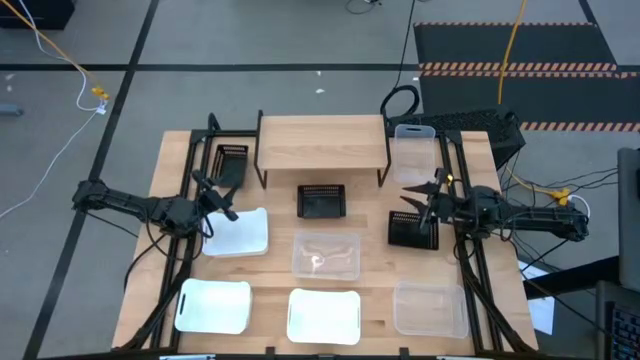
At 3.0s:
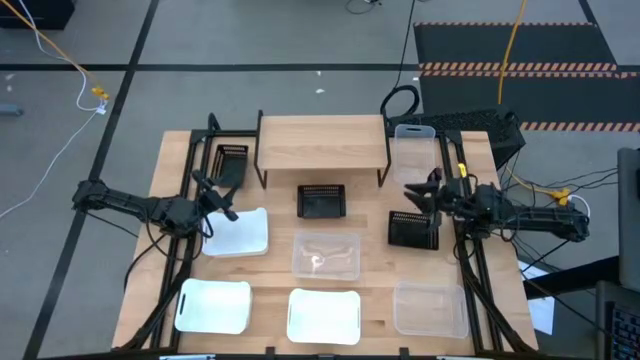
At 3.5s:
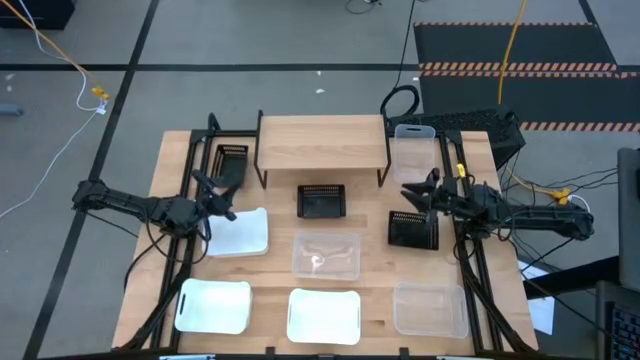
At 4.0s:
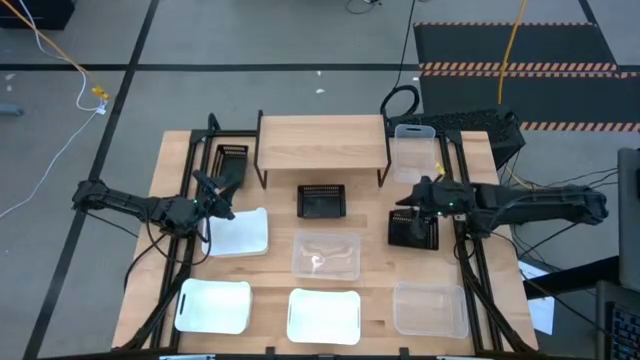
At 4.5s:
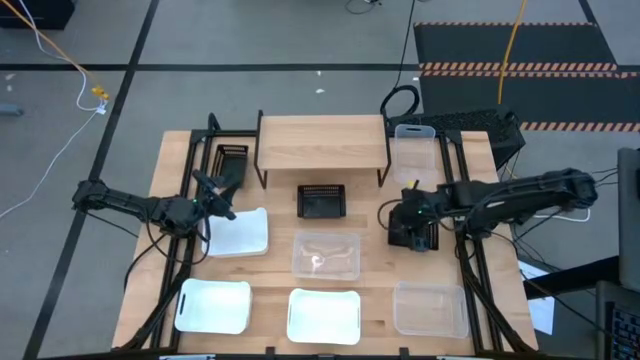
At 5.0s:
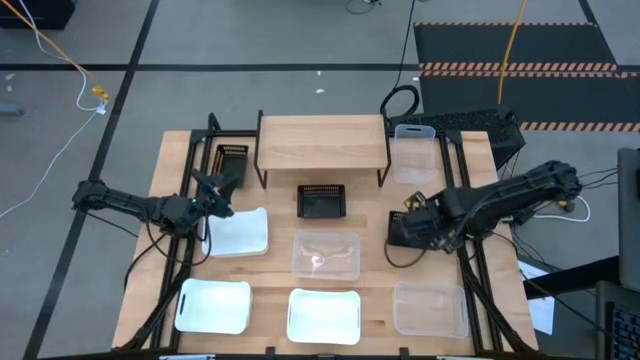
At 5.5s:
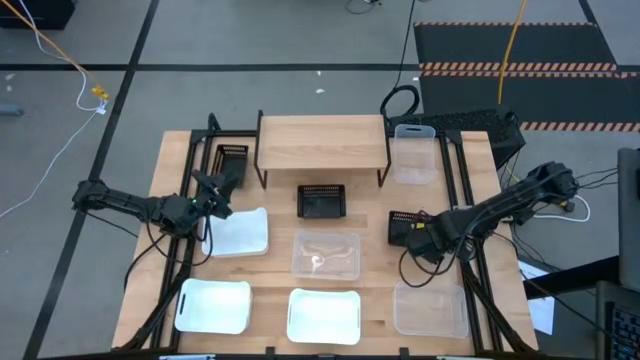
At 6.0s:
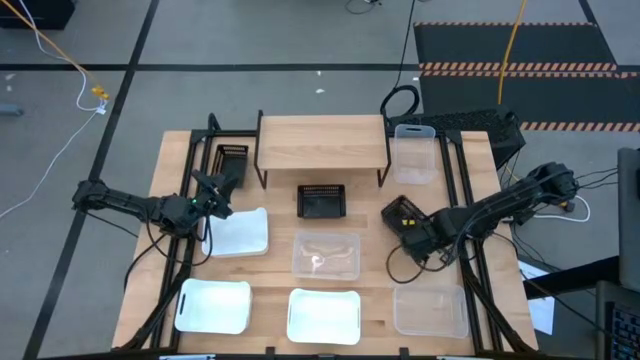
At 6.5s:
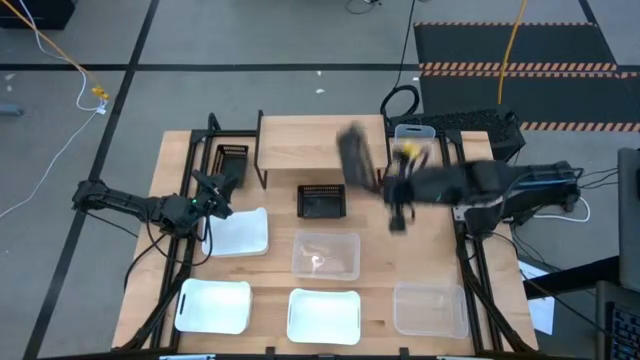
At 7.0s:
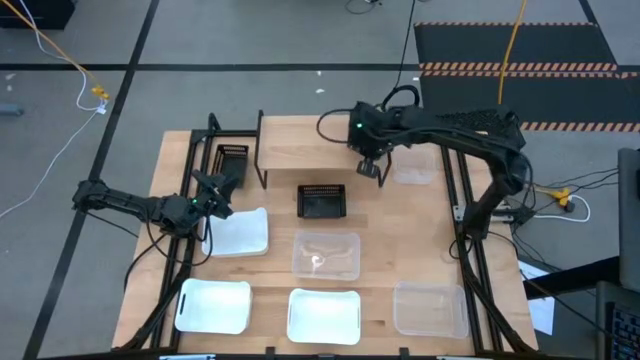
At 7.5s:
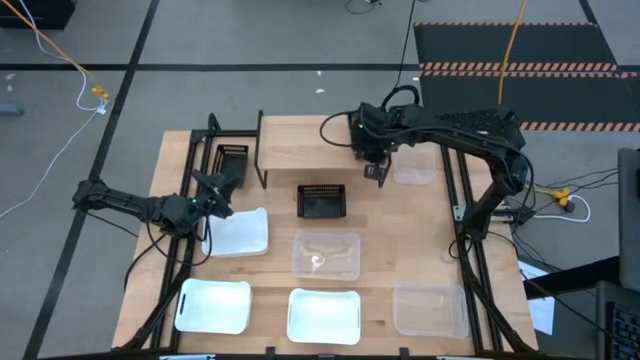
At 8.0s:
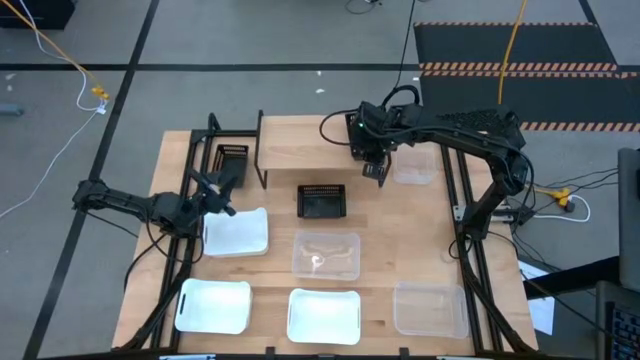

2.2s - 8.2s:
Task: Stack baskets on shelf by color
Put the bottom black bin on the shelf

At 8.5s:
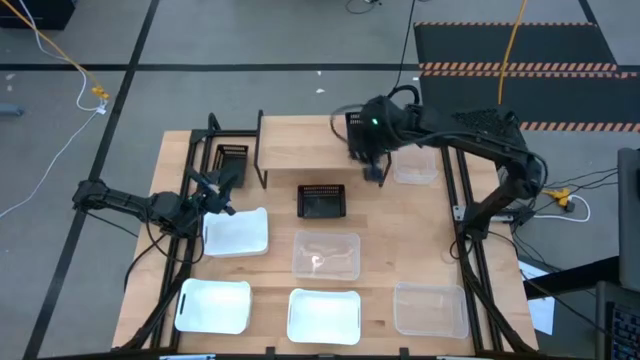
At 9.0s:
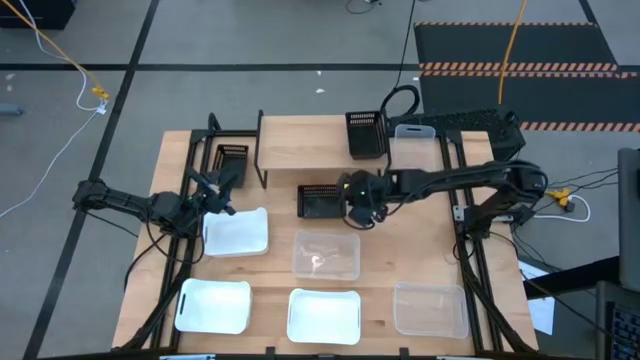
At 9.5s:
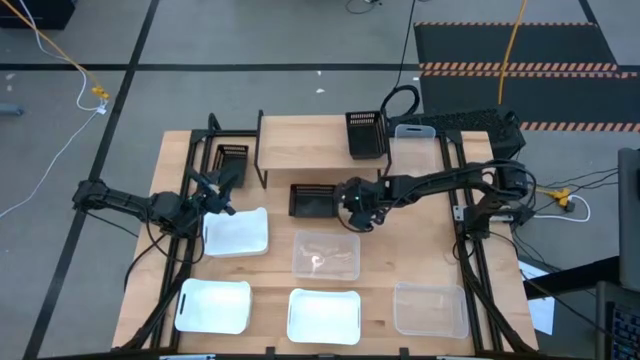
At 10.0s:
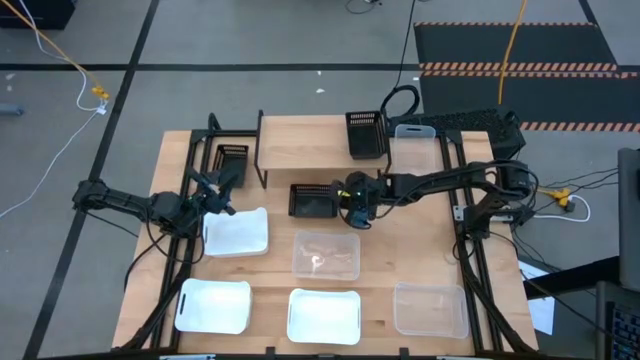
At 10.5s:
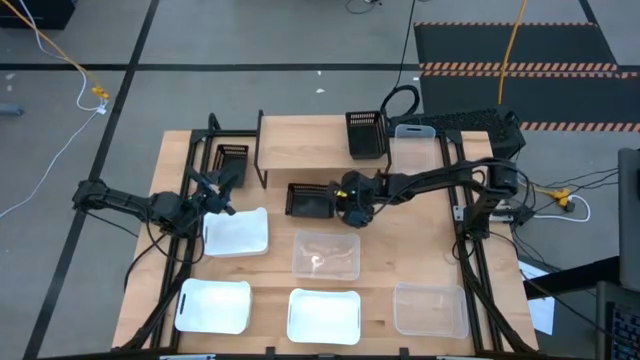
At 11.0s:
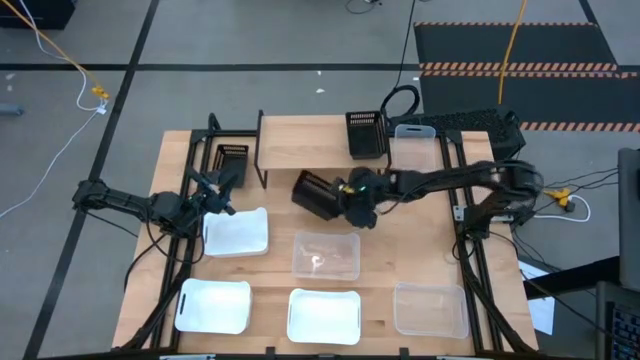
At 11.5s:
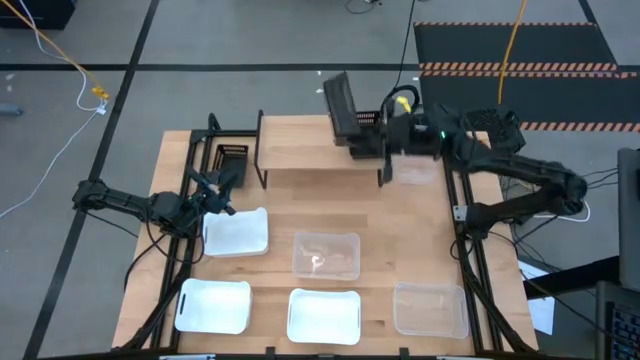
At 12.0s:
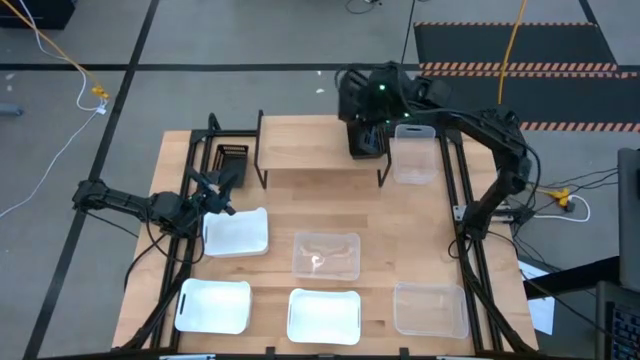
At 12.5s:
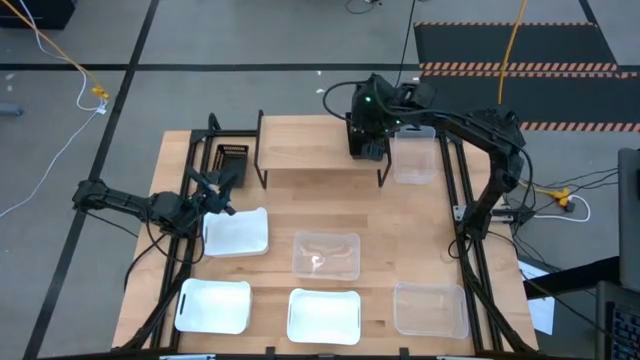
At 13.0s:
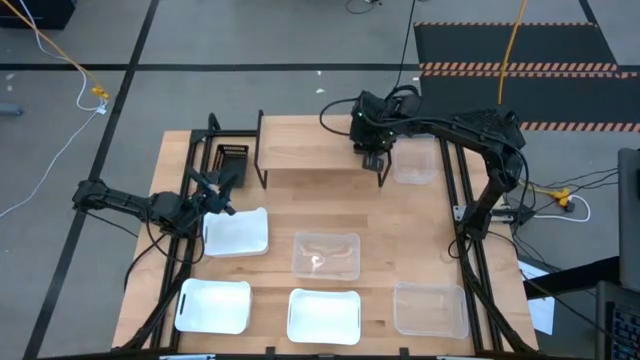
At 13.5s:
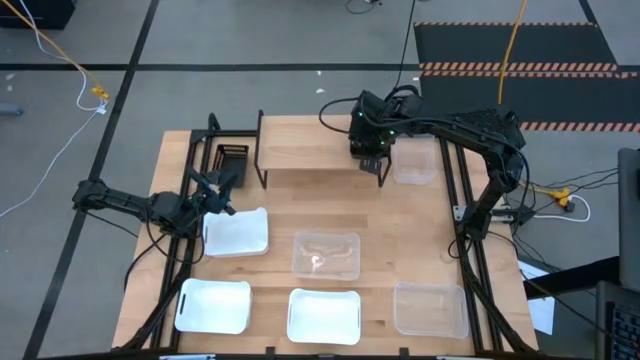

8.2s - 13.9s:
Stack the bottom black bin on the black bin on the shelf

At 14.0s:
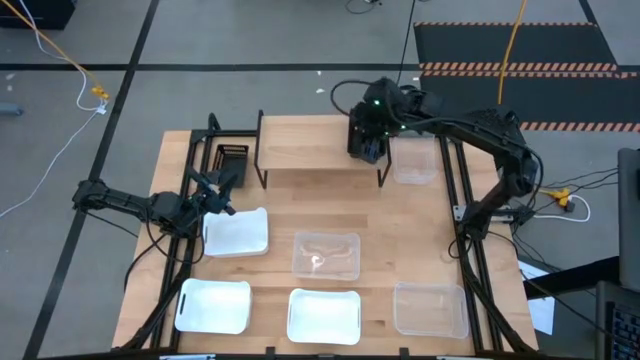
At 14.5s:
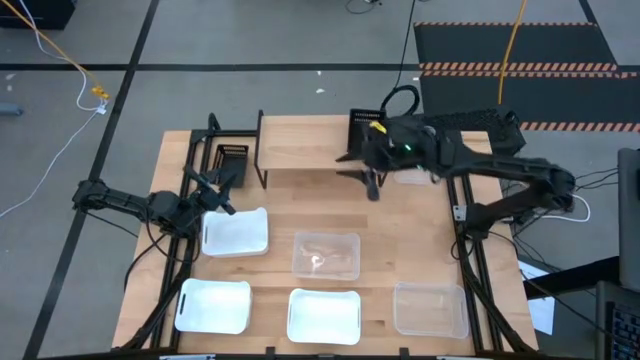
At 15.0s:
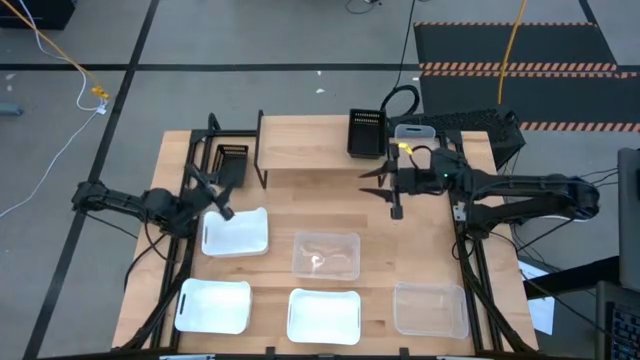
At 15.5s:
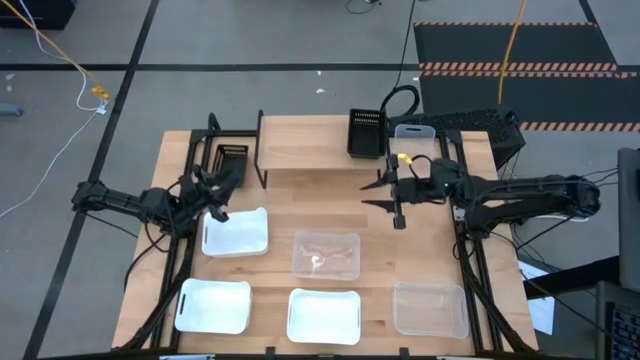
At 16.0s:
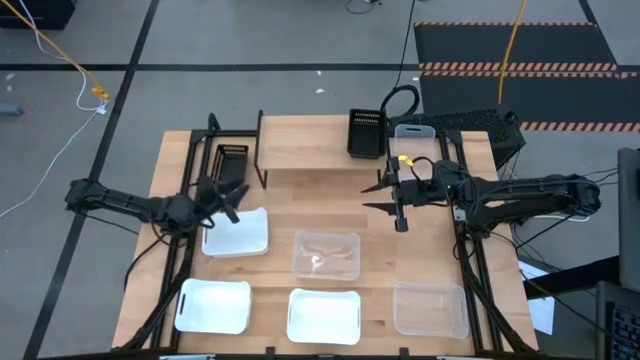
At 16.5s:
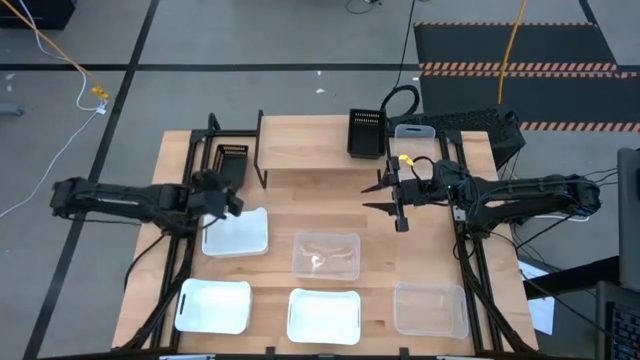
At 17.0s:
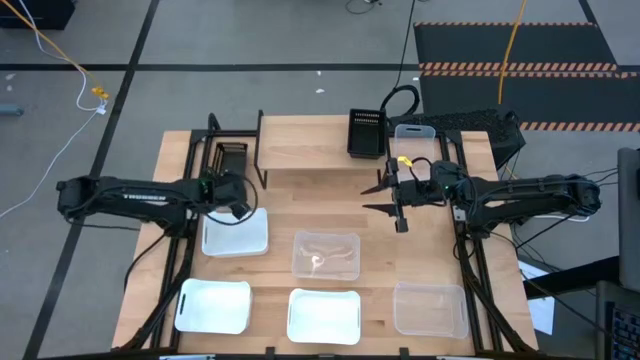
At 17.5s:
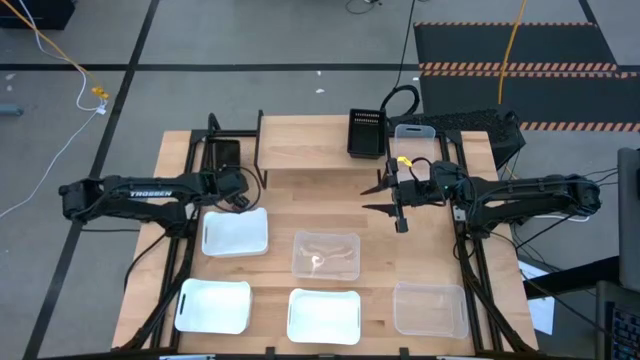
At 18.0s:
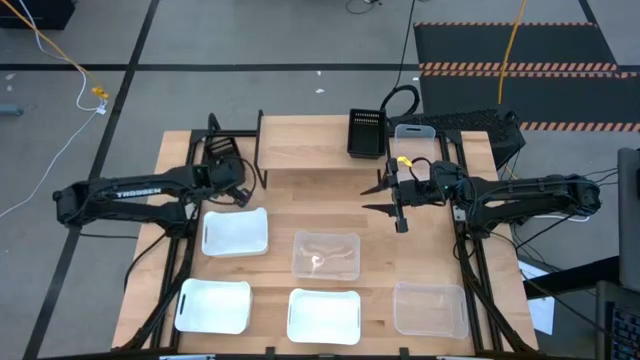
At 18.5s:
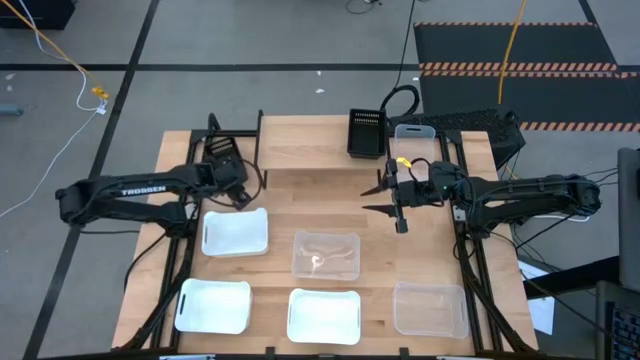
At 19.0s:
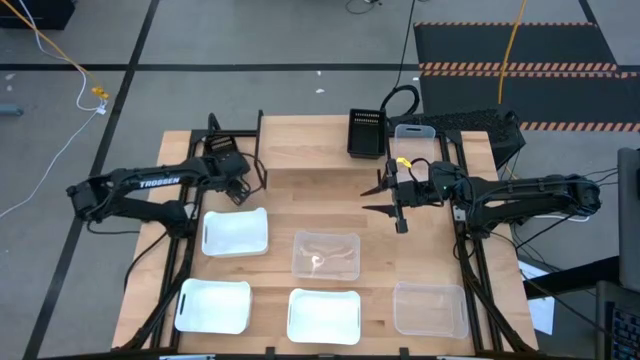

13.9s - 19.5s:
Stack the black bin on the black bin on the shelf

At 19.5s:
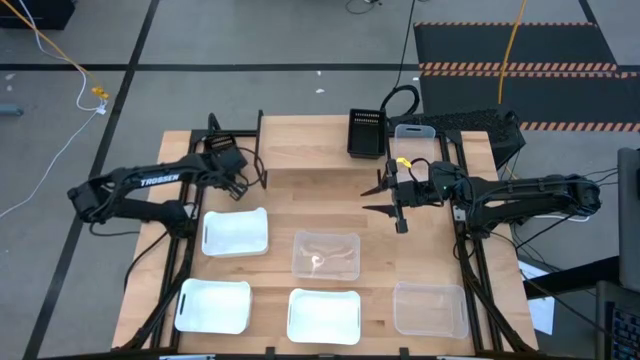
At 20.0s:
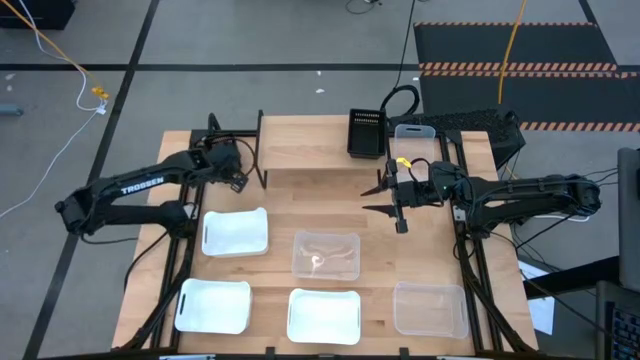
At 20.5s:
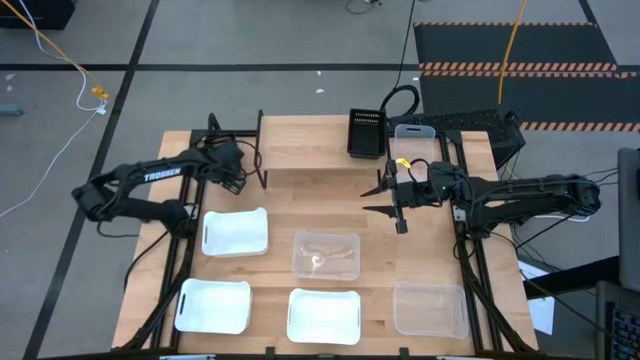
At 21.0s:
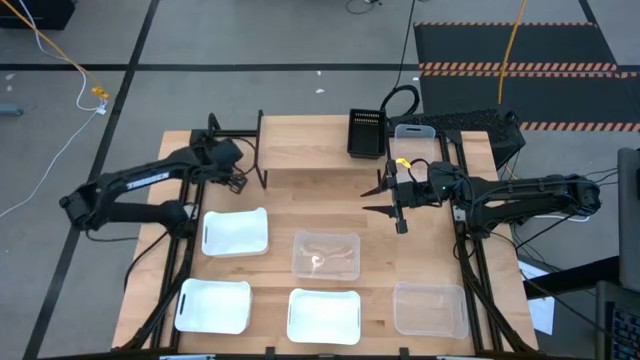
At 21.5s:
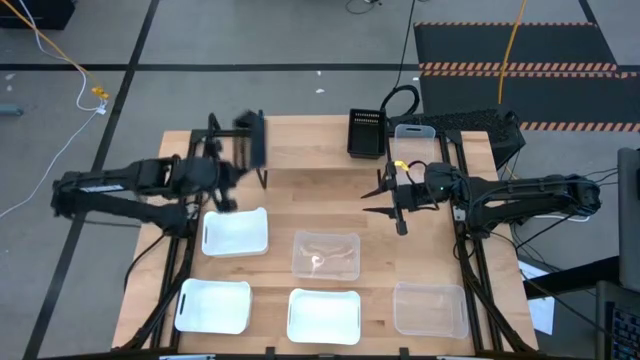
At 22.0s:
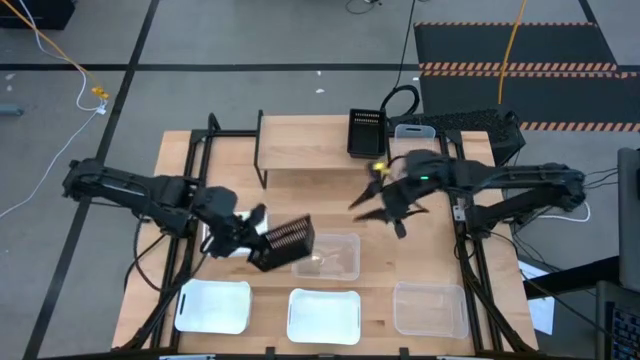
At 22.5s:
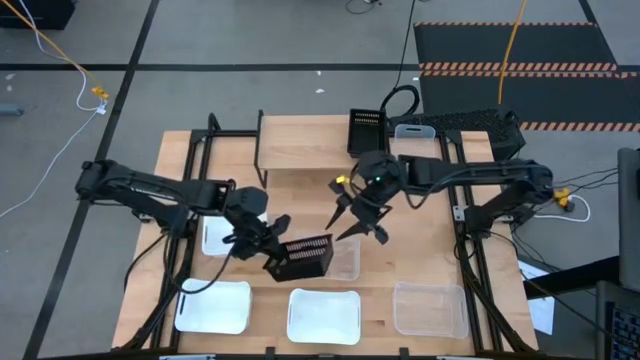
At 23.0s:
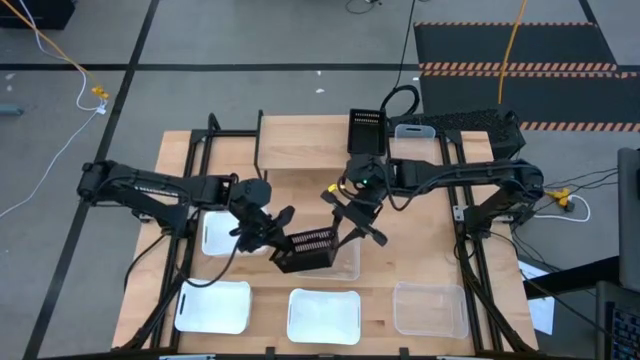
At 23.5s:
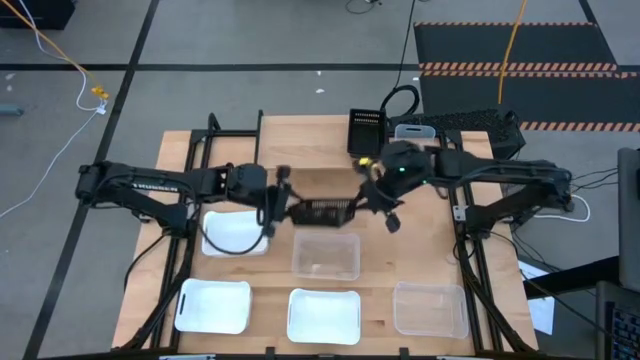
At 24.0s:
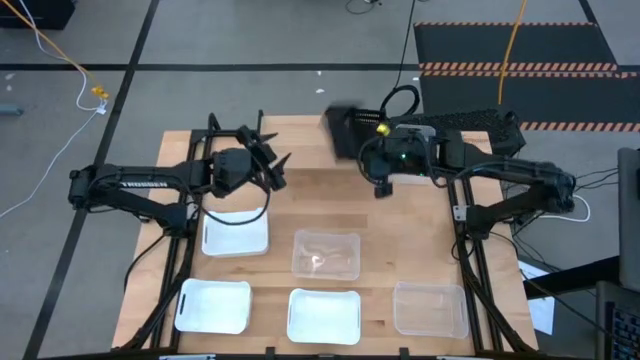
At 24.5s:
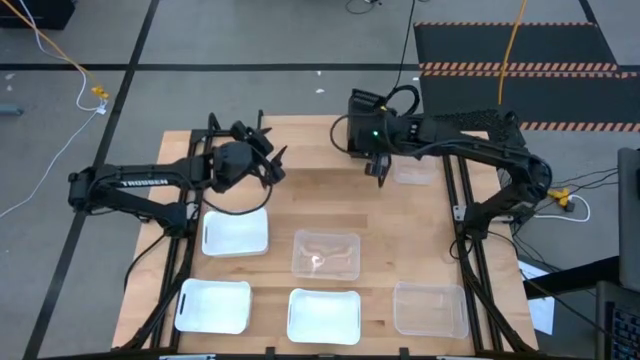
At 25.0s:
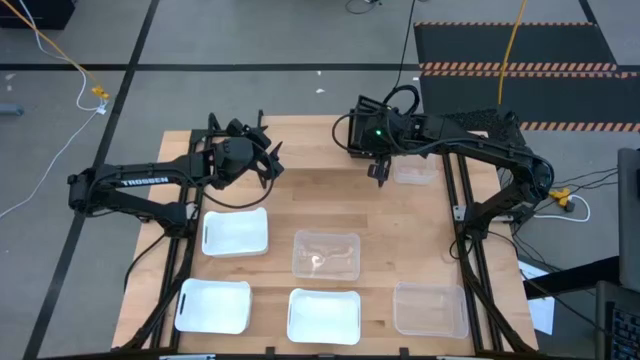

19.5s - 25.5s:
Stack the black bin on the black bin on the shelf
